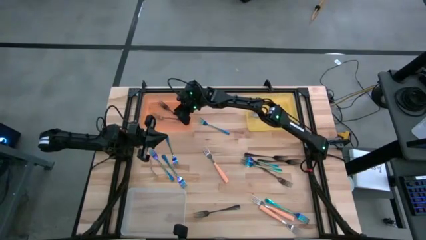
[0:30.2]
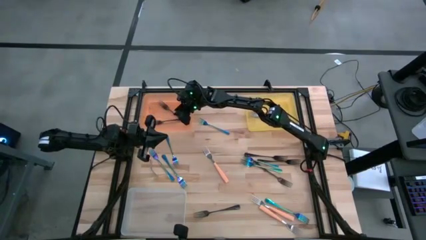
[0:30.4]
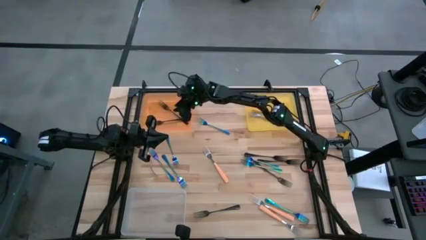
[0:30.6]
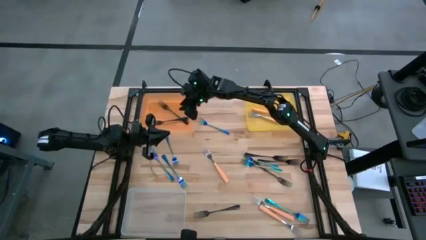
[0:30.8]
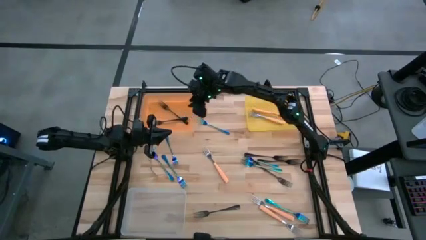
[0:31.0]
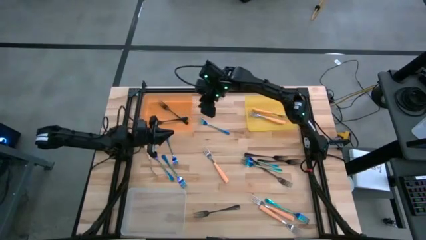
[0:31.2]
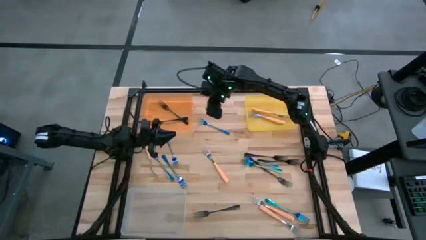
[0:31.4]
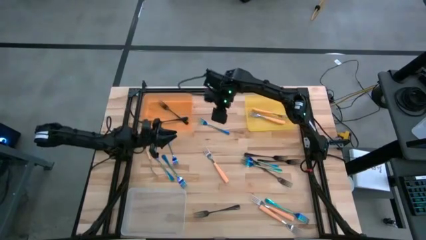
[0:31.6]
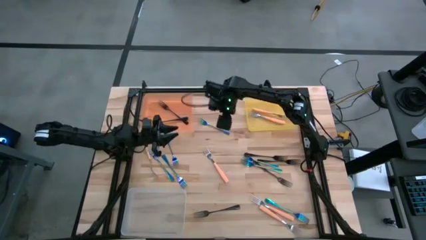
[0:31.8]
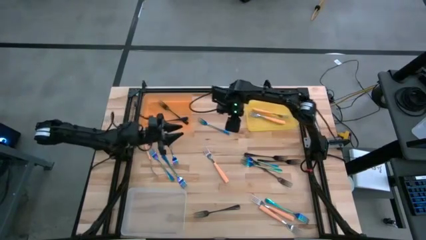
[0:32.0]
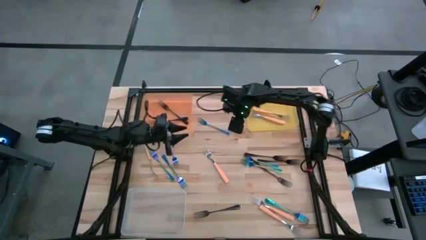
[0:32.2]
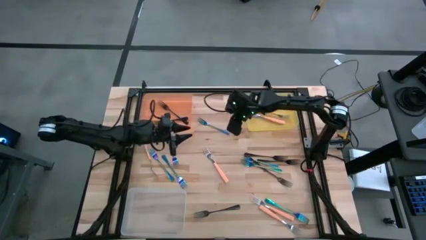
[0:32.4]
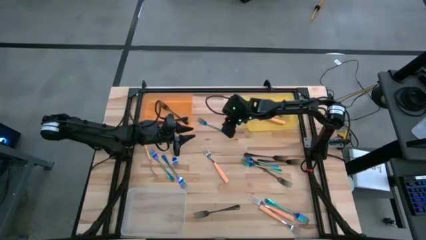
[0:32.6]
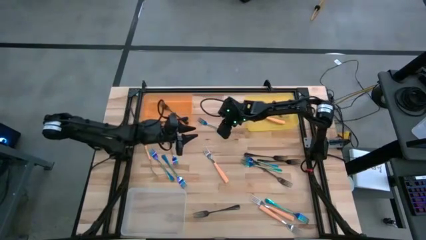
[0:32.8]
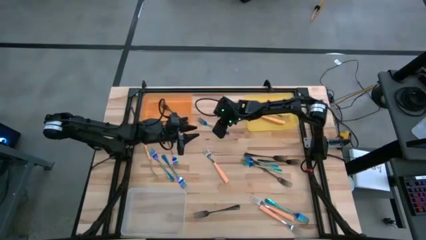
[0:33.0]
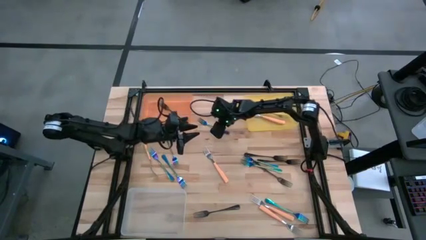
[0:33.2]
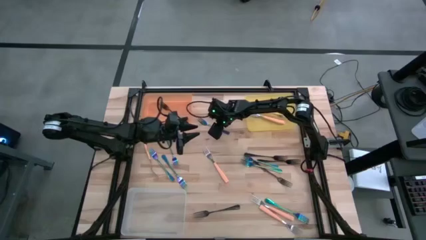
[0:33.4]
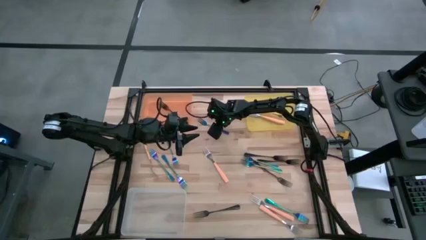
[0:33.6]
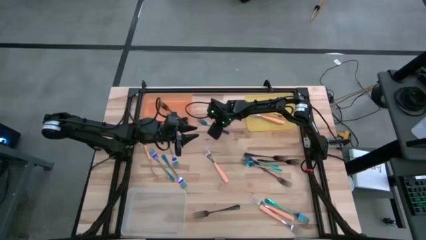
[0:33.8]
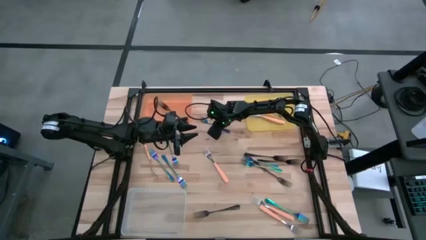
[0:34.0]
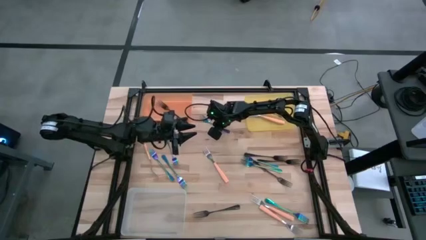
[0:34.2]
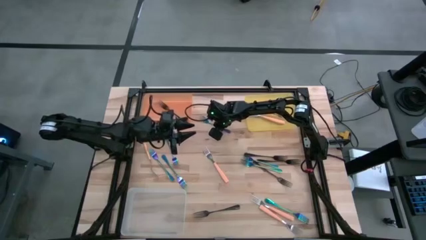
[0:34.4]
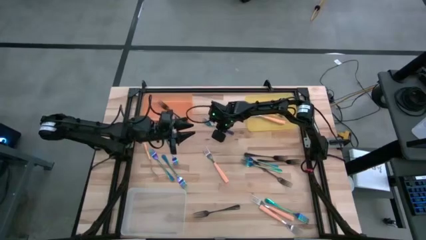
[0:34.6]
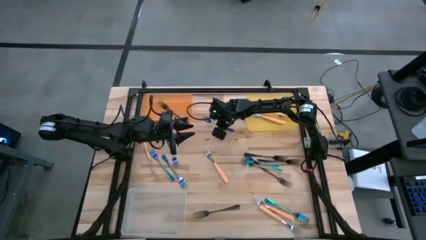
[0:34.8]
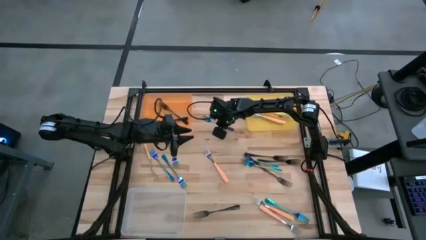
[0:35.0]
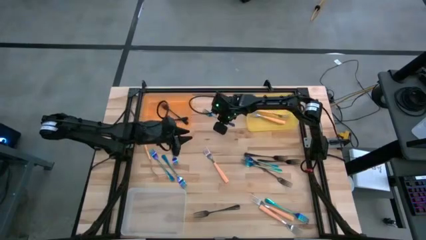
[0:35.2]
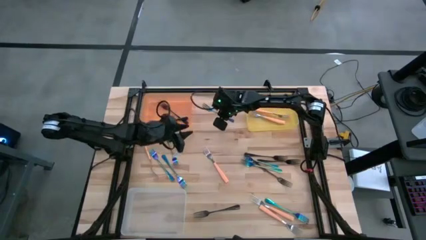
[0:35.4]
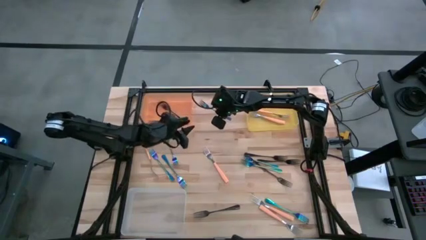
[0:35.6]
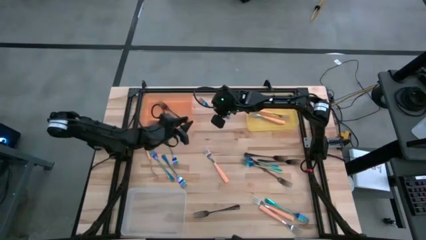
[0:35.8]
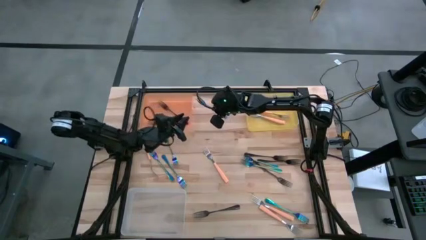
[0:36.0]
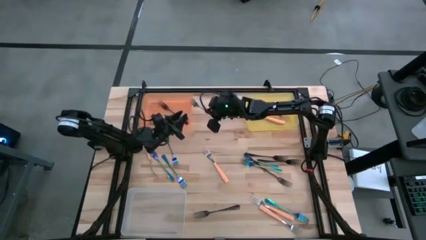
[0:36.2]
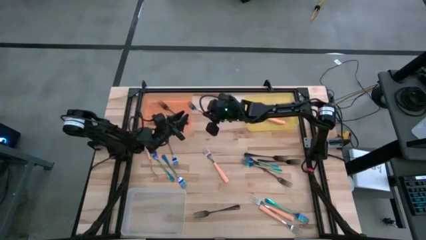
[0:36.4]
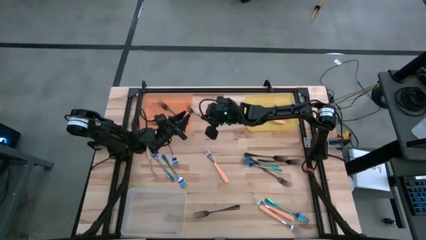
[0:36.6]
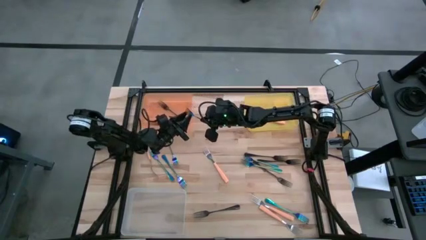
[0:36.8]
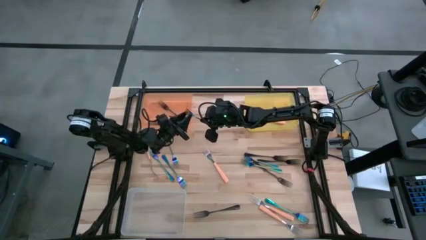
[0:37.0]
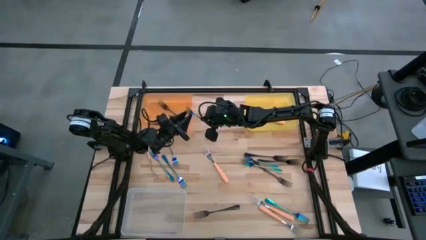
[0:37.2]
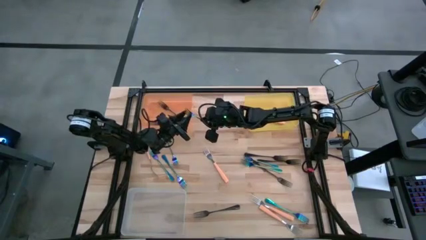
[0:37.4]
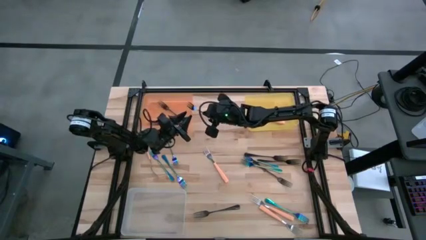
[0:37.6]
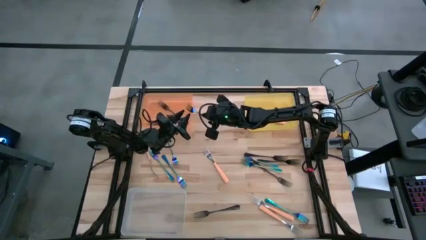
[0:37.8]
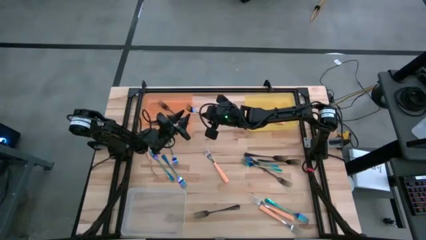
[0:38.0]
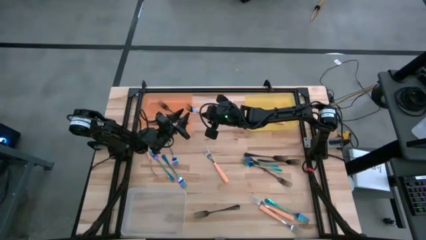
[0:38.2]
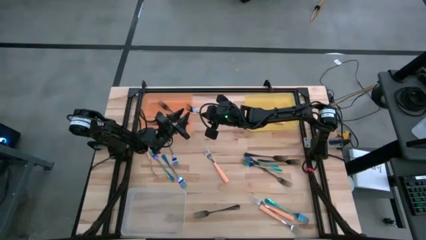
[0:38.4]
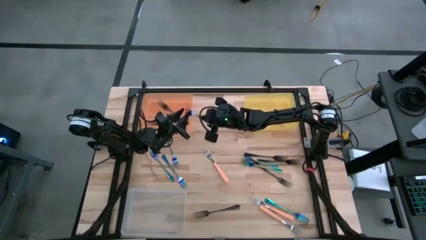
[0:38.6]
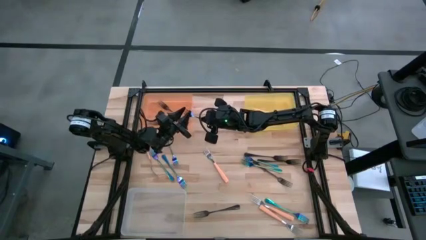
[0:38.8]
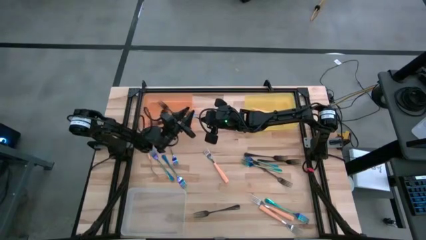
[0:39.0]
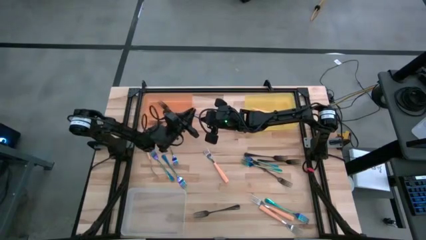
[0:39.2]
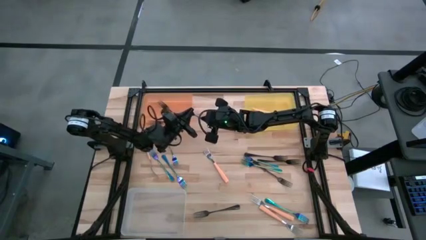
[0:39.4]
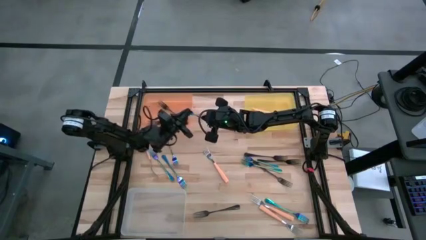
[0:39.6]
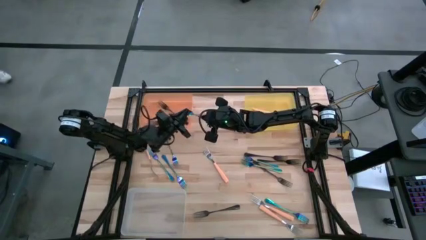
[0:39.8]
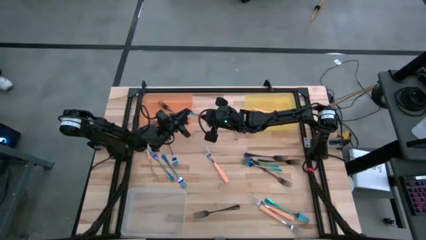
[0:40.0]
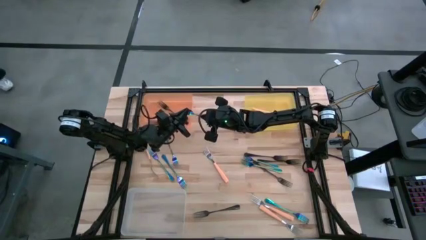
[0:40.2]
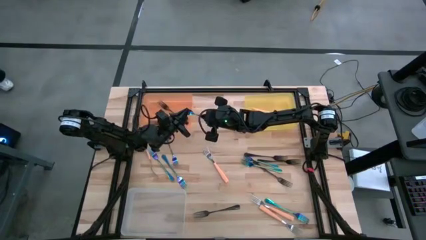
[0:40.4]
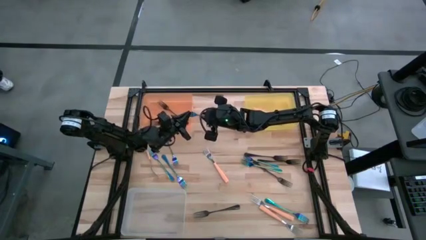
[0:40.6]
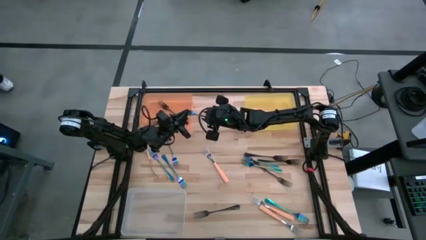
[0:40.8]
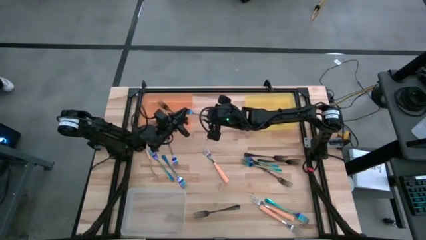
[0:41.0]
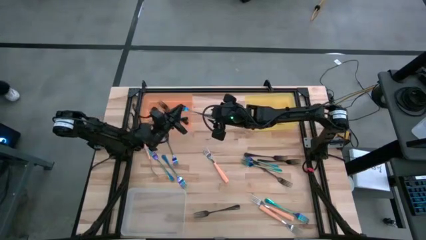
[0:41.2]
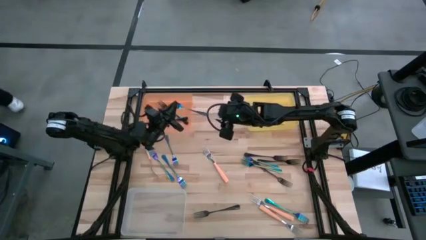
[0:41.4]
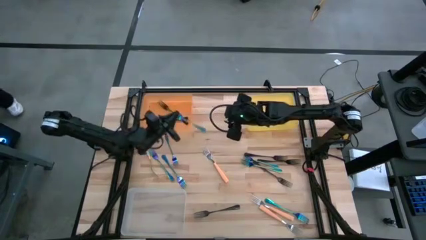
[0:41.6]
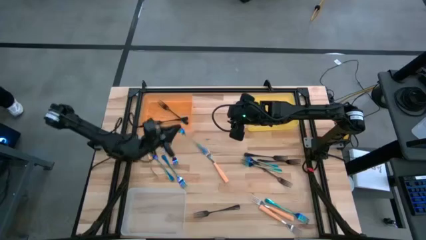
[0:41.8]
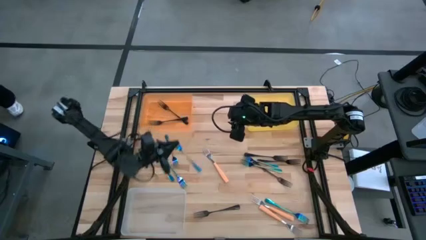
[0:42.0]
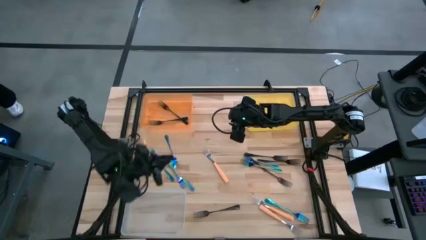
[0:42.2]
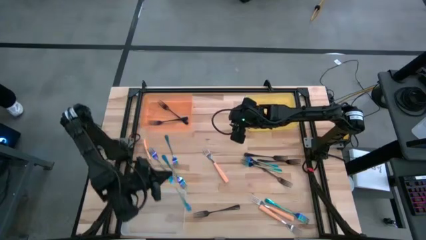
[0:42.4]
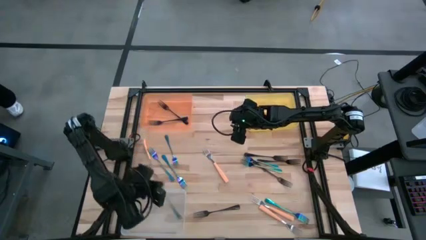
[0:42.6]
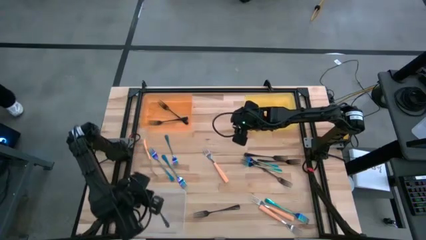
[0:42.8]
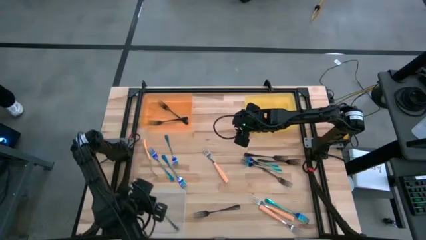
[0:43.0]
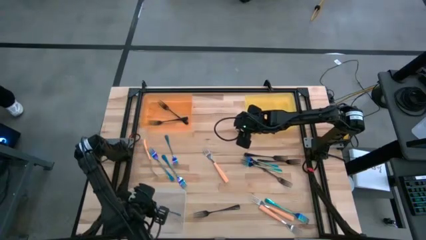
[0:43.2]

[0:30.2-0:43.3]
Task: Sort silverware by color (type)
Put the blue fork into the transparent bin

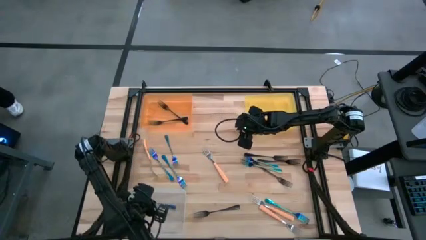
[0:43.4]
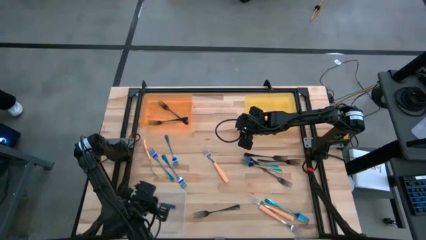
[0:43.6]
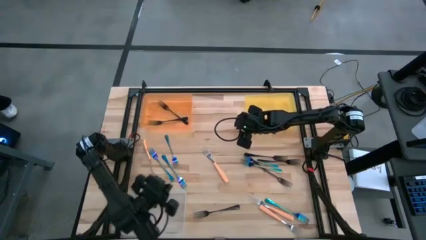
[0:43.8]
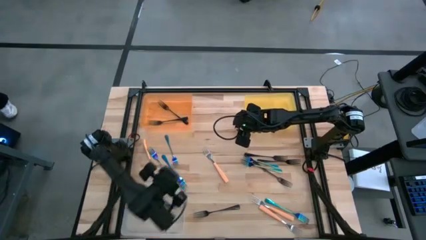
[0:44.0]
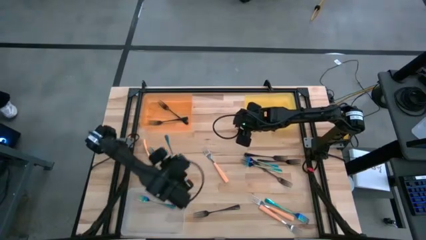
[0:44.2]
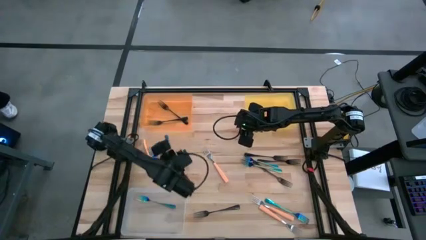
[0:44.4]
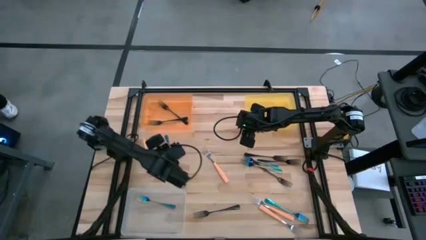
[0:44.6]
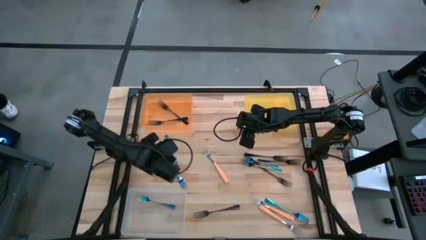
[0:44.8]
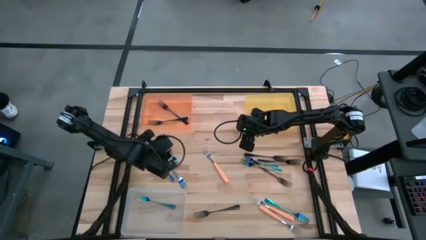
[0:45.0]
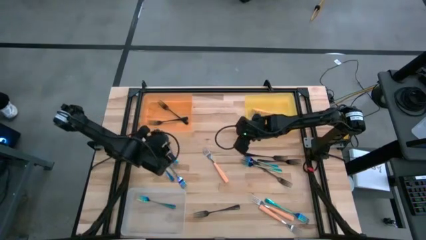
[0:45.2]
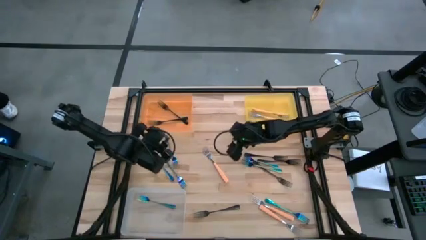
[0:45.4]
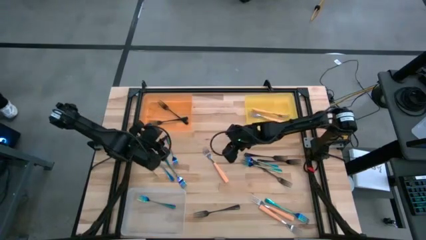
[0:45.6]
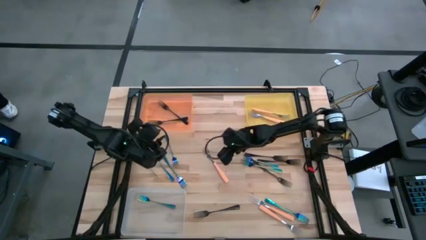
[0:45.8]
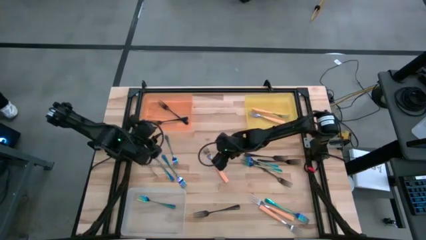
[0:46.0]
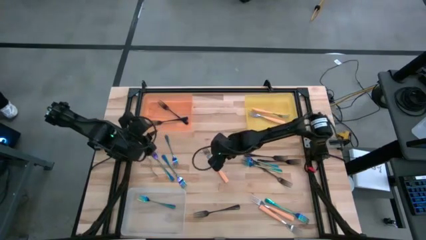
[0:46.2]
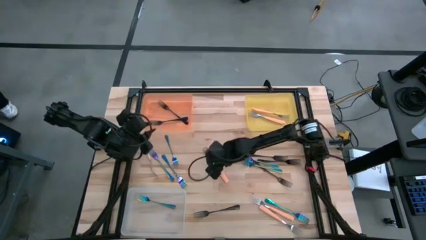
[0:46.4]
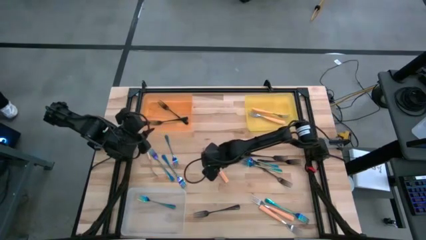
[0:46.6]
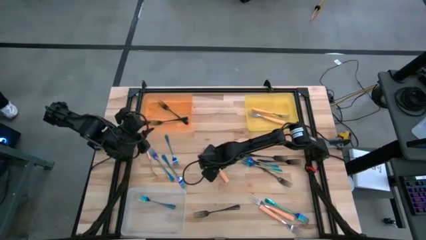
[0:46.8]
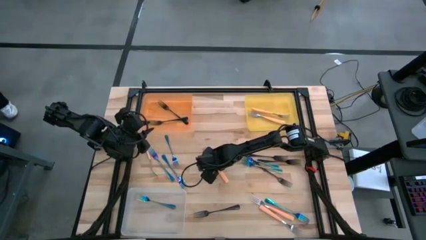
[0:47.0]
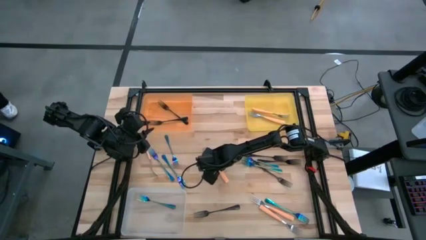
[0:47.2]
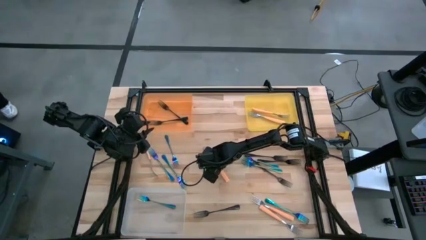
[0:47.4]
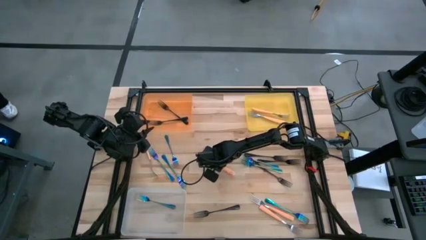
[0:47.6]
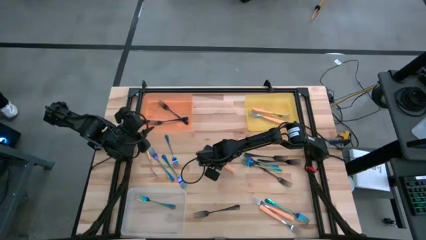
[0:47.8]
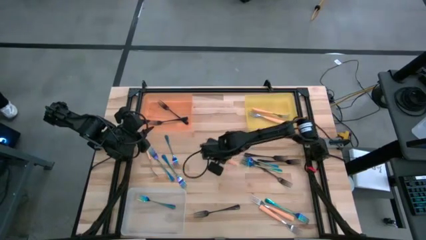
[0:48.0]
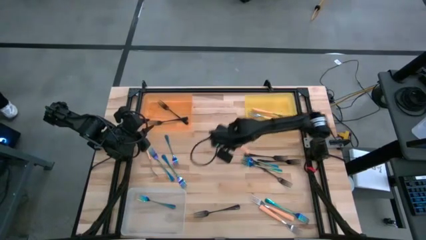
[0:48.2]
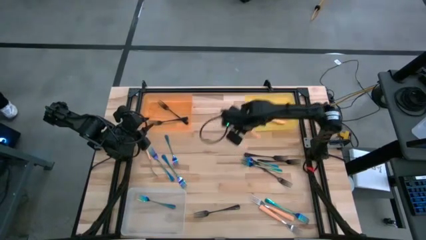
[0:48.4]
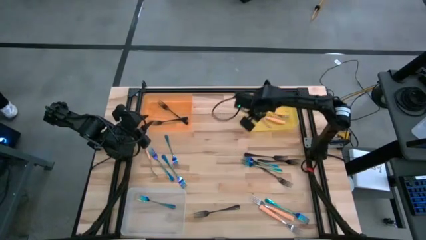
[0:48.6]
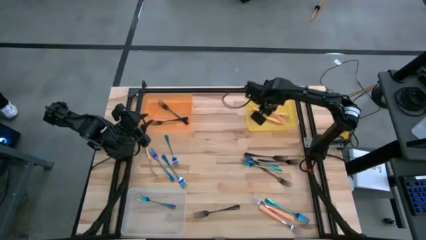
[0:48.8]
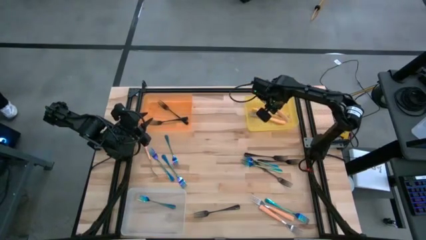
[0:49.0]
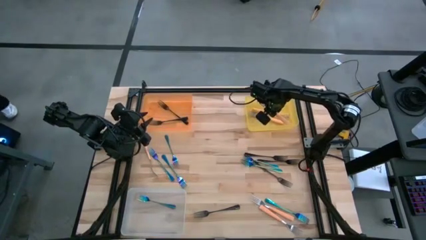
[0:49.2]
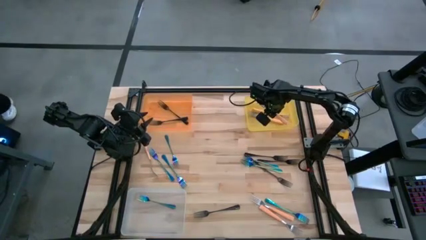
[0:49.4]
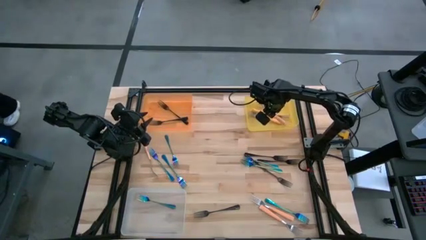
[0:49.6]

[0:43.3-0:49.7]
Put the orange fork into the yellow bin
